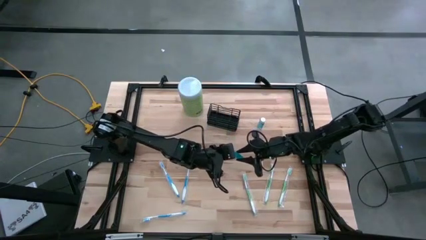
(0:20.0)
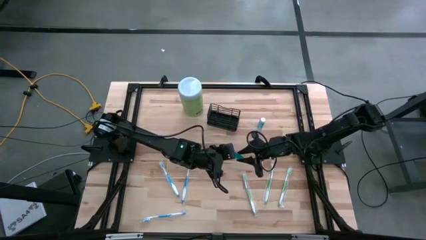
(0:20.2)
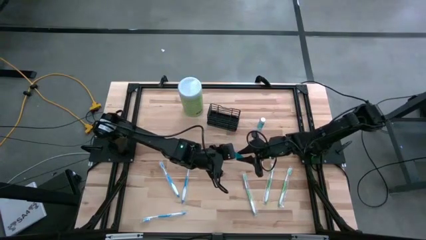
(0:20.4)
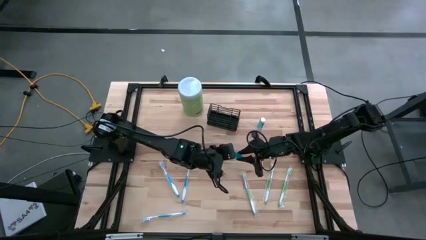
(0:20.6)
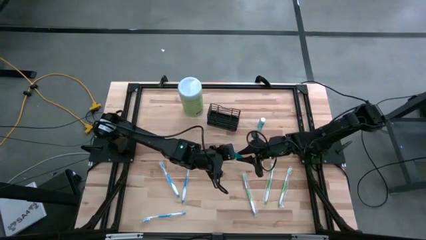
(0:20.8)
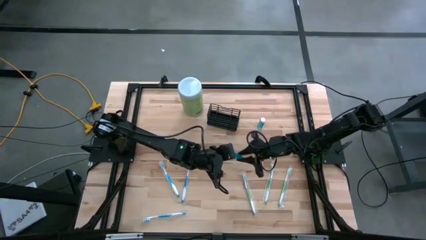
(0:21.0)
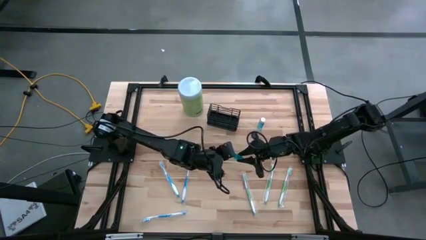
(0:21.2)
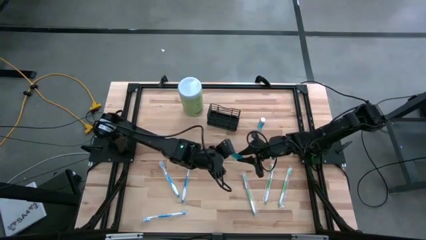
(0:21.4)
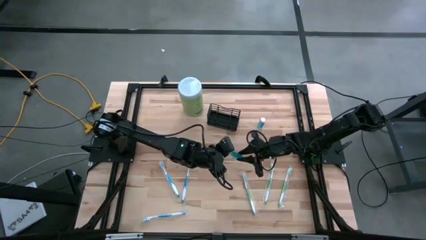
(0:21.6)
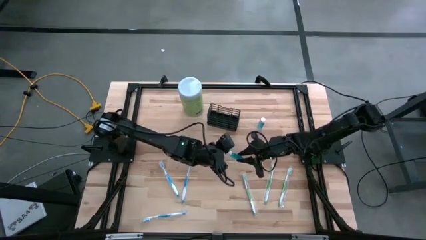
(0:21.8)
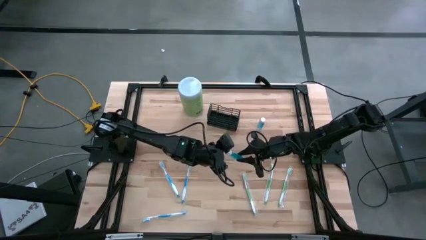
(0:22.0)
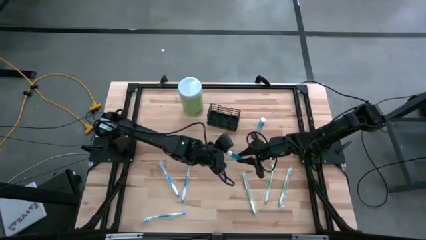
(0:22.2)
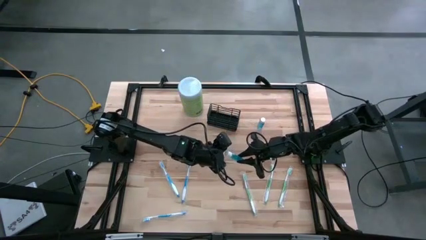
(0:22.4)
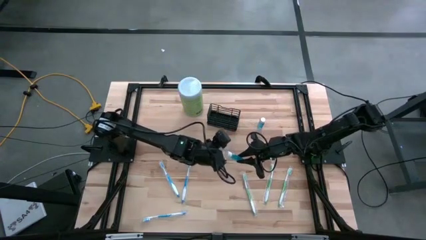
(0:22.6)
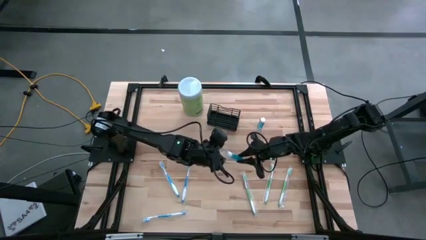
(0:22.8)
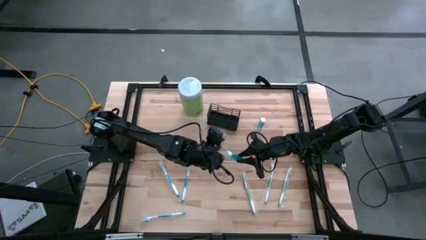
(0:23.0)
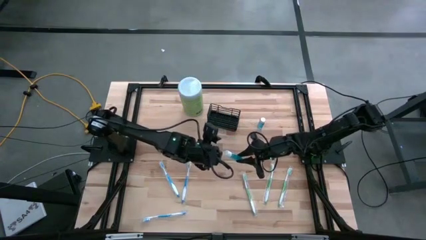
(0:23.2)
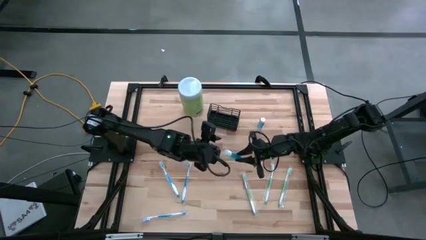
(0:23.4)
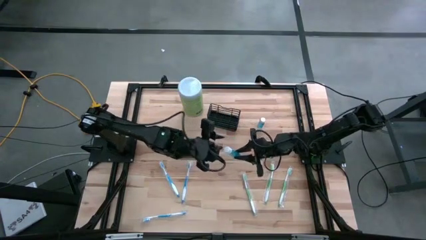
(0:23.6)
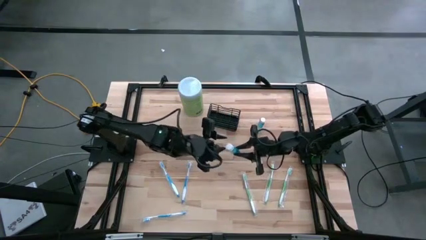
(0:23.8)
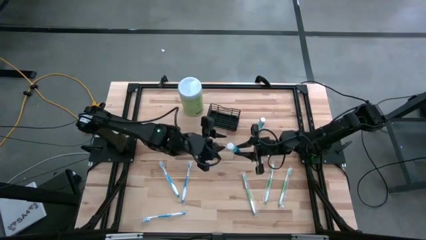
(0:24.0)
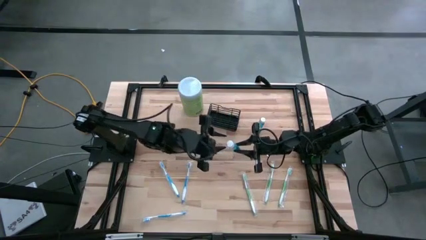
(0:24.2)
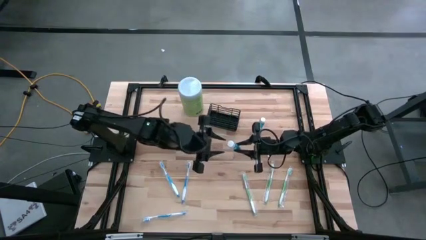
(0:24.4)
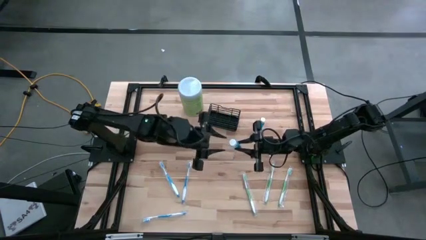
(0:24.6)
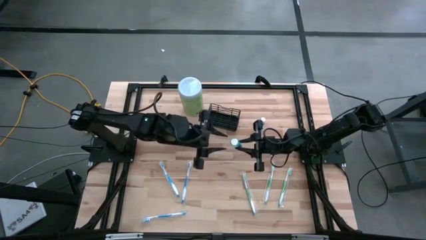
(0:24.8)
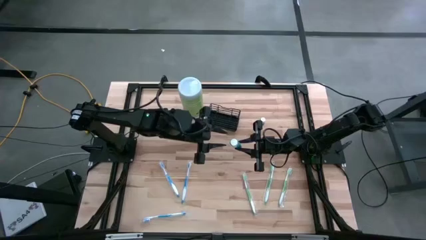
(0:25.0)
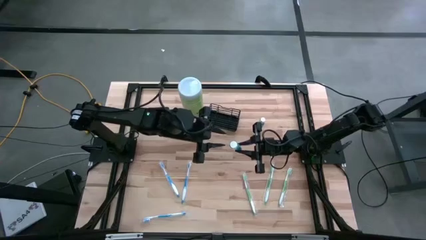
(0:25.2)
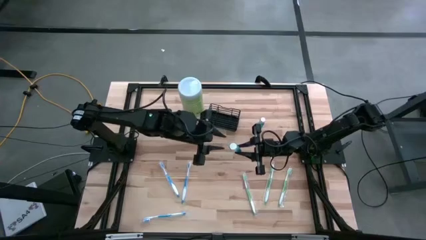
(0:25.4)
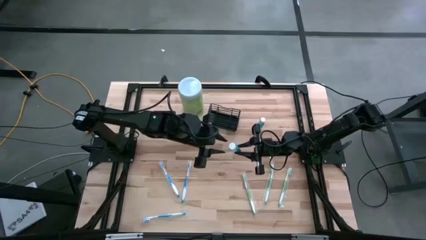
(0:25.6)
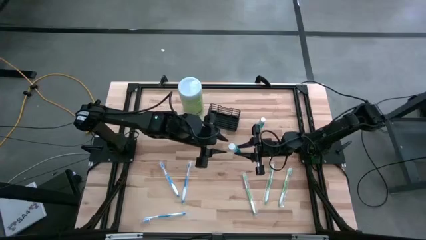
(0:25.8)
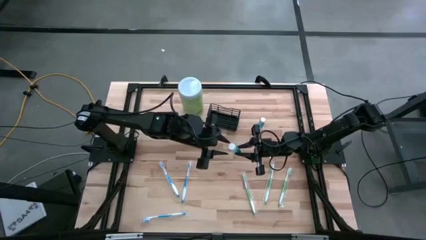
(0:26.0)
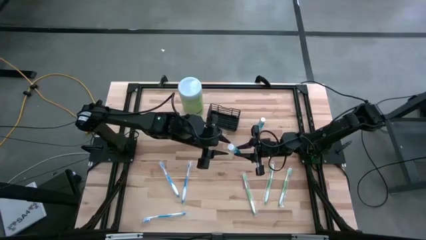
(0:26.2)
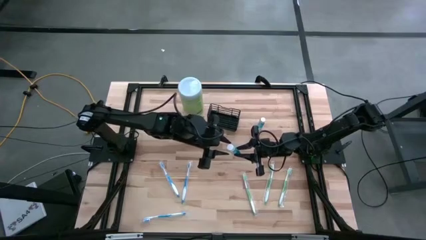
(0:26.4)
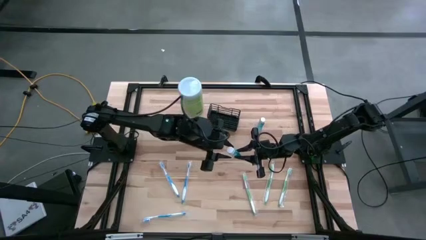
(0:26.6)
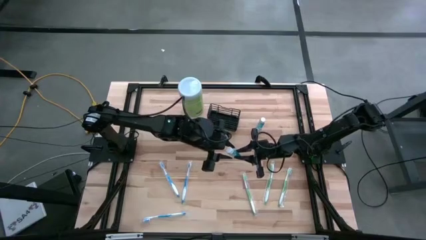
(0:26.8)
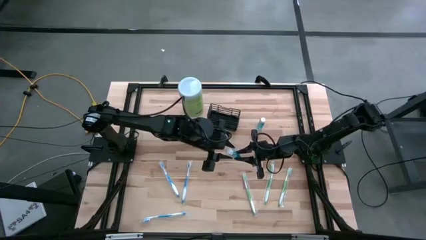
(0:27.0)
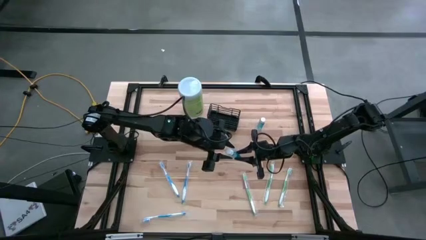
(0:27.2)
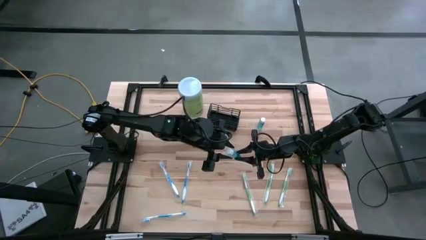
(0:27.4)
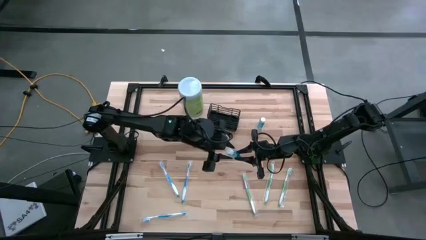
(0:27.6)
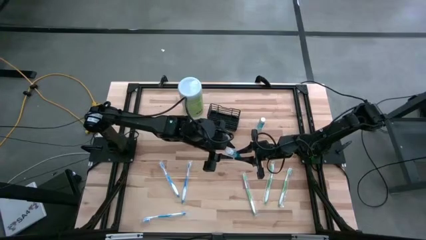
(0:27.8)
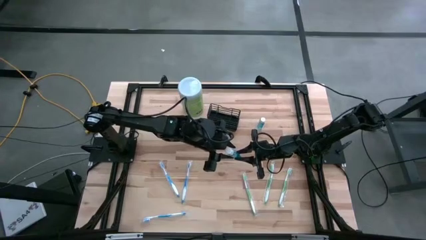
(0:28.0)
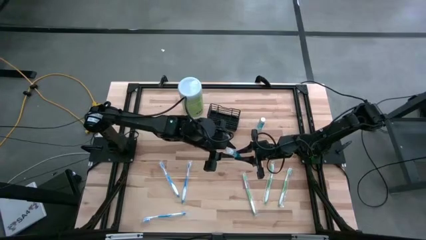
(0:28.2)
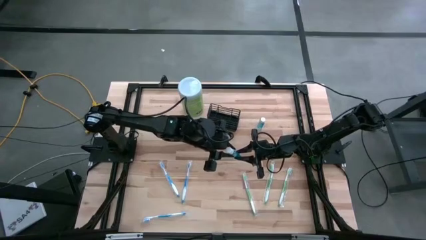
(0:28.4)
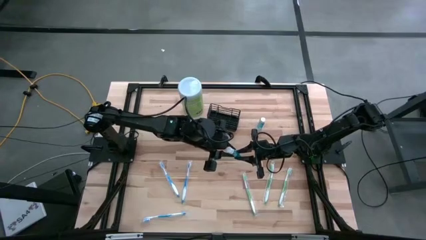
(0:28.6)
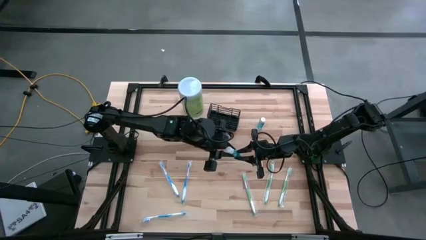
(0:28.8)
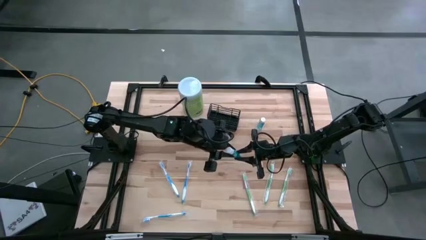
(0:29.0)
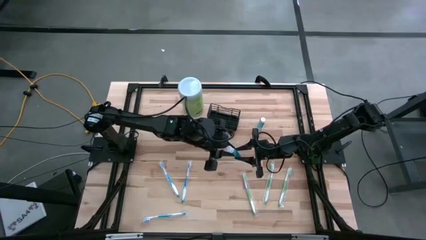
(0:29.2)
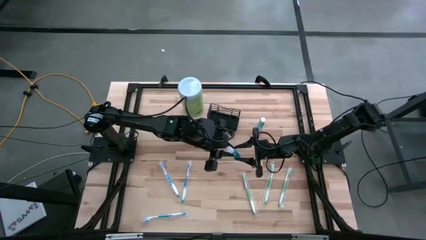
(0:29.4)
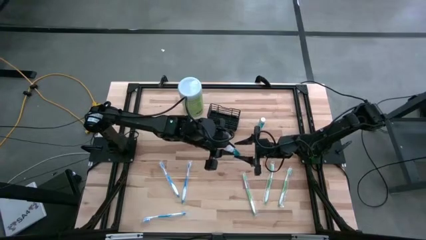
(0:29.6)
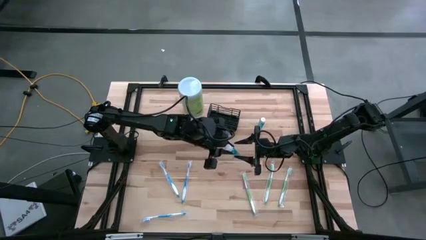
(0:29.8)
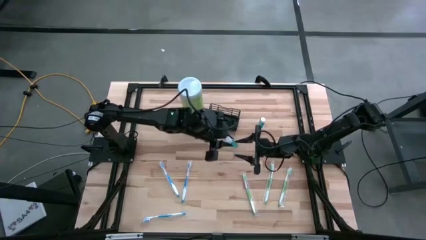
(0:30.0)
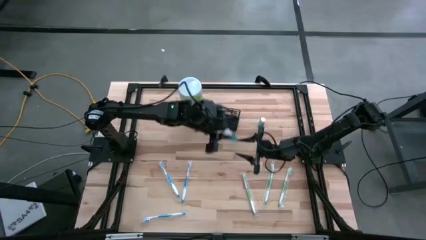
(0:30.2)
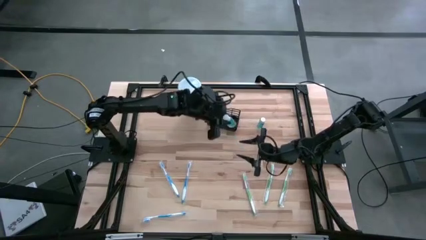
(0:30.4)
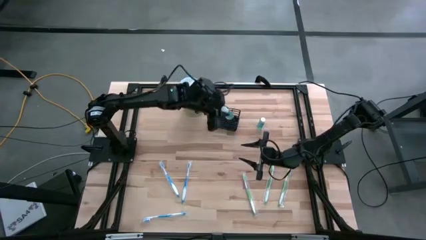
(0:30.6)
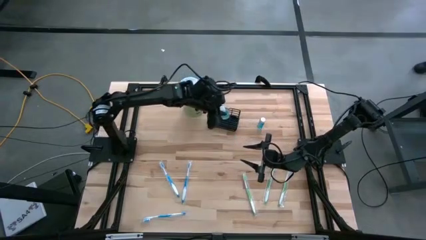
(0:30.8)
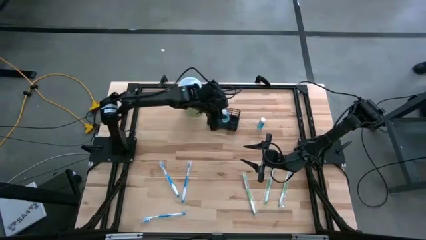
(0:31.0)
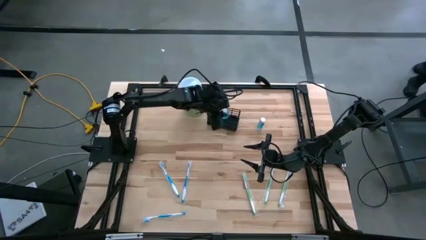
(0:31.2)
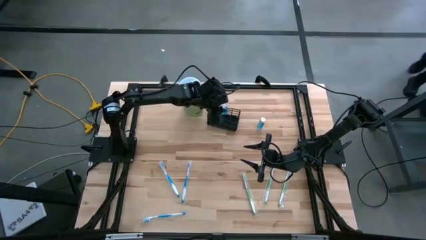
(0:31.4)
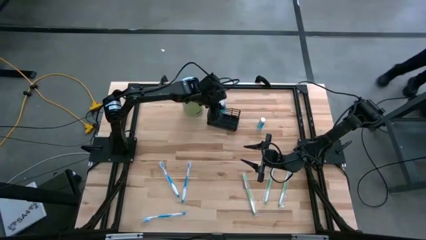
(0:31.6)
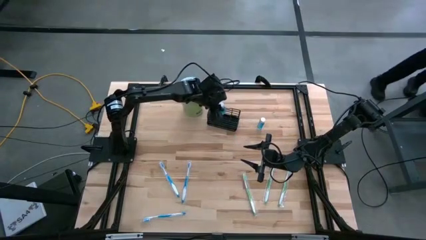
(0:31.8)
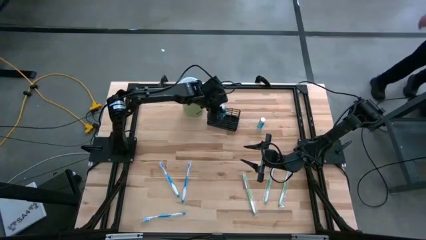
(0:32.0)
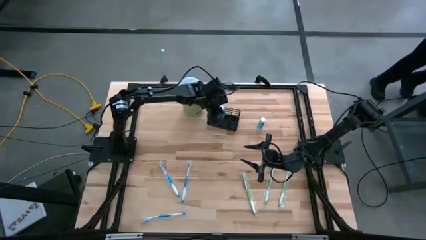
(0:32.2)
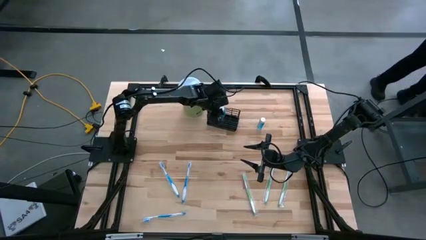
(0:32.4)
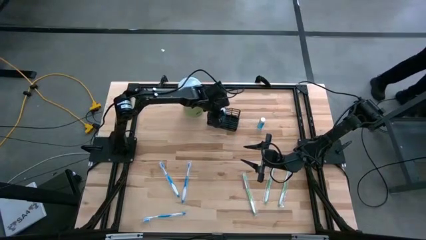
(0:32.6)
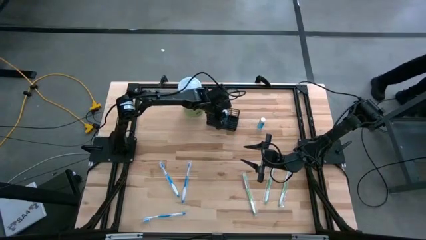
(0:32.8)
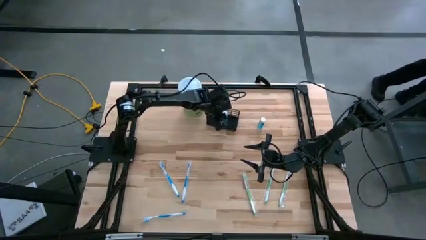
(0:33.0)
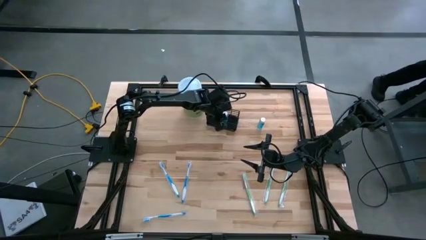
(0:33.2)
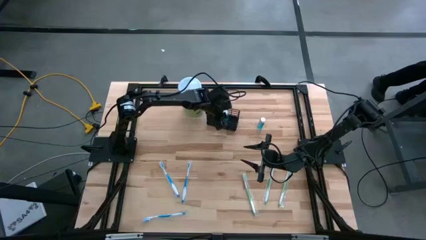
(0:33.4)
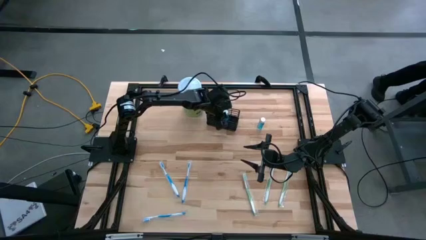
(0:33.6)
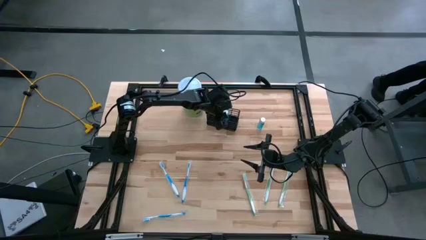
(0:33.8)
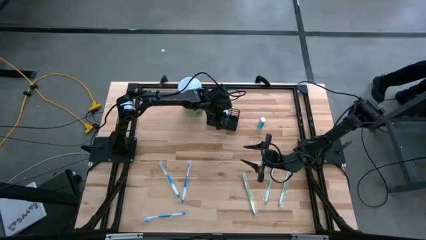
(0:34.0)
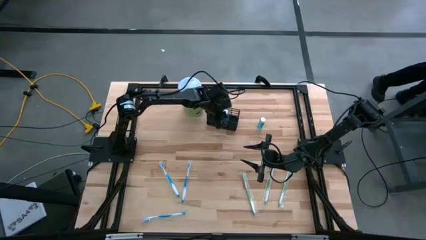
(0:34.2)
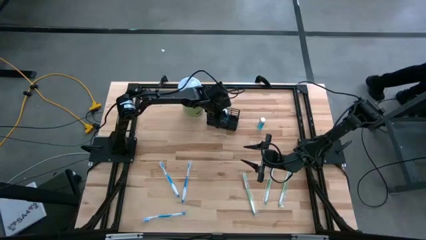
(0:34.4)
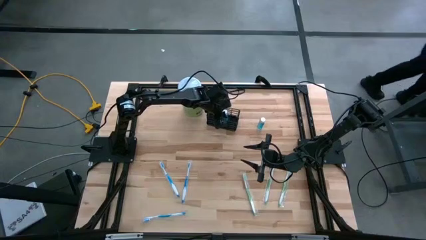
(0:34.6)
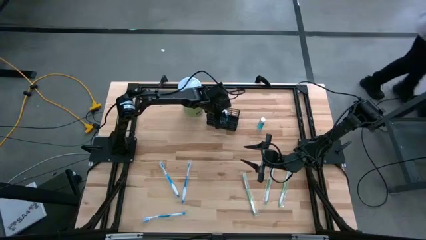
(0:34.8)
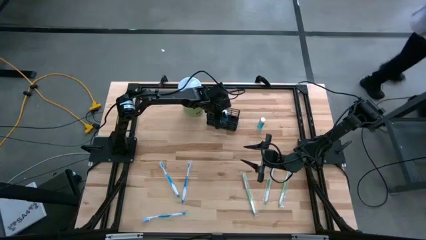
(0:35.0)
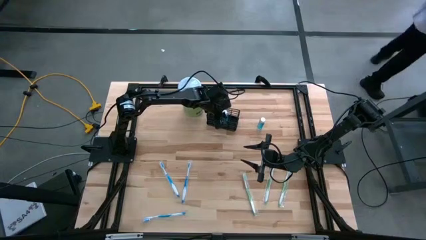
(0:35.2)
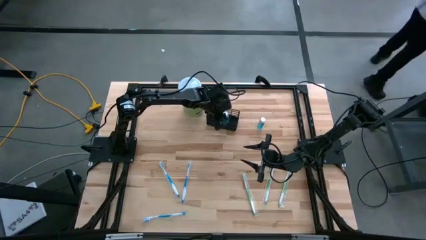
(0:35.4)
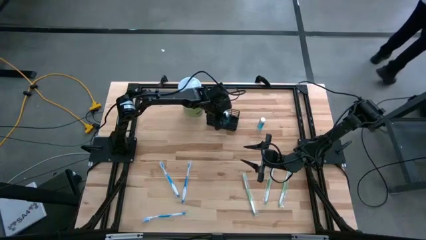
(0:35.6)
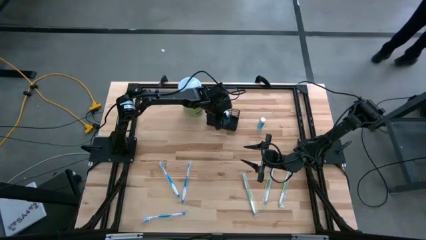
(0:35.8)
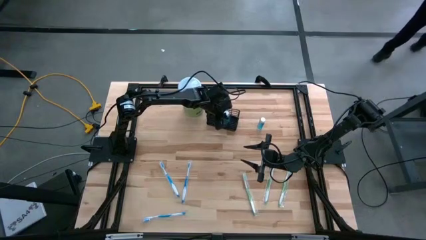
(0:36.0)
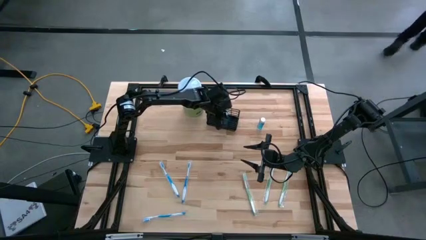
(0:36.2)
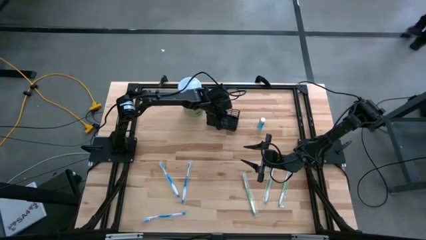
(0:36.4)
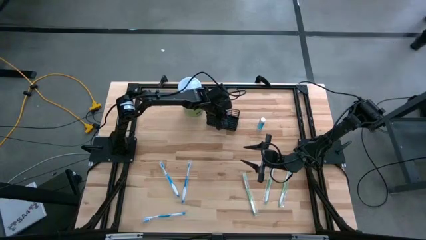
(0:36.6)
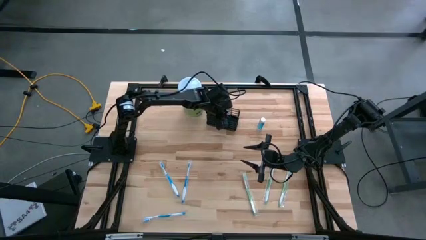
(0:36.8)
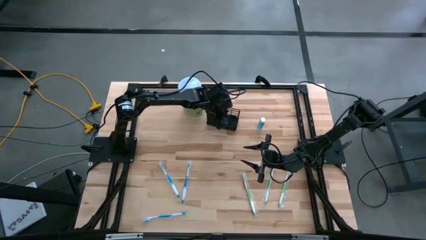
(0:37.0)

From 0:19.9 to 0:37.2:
Task: Pick & Place toothbrushing station
Put the left mouthwash into the mesh organizer
